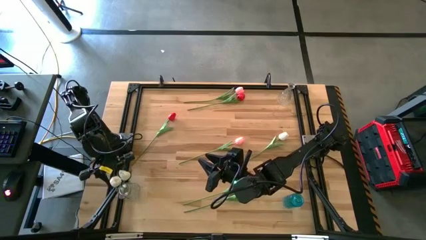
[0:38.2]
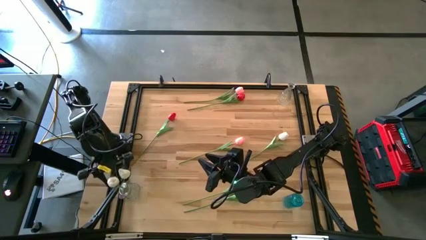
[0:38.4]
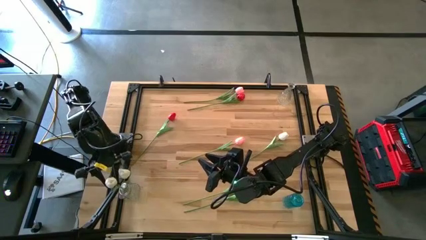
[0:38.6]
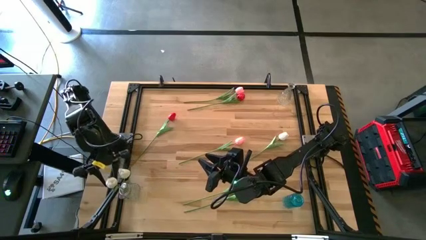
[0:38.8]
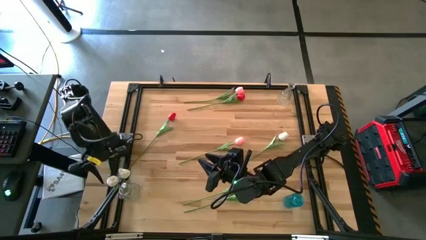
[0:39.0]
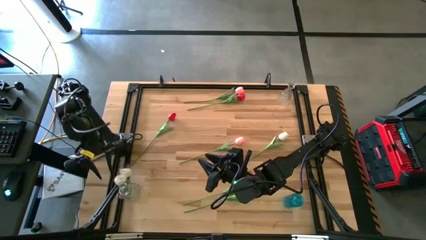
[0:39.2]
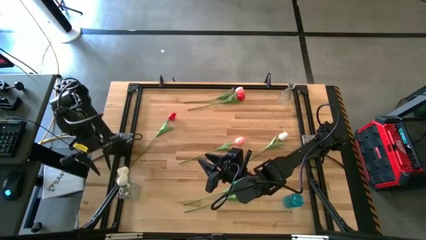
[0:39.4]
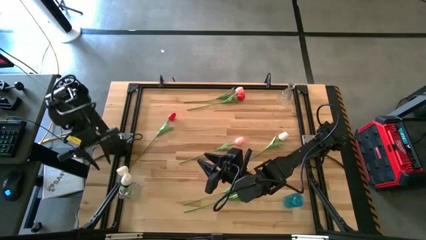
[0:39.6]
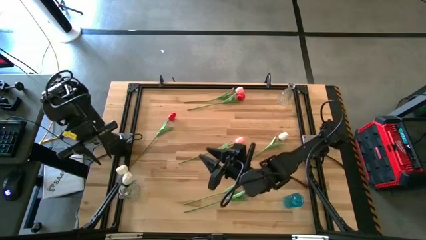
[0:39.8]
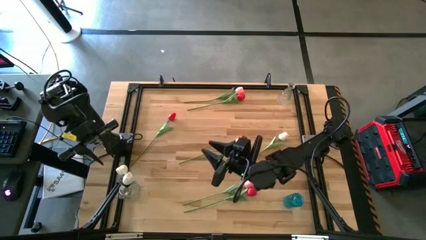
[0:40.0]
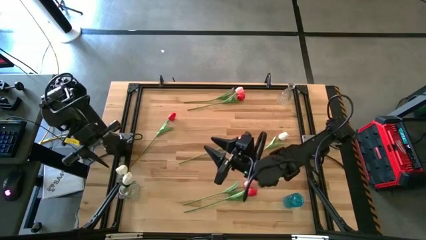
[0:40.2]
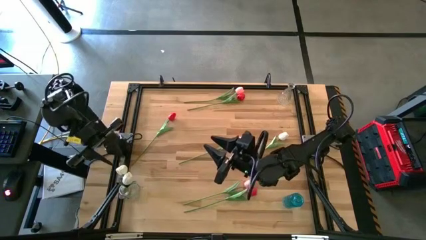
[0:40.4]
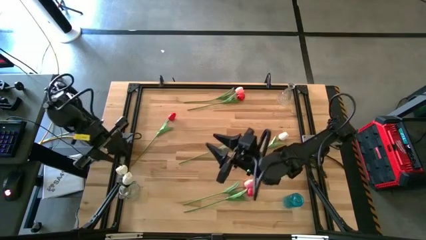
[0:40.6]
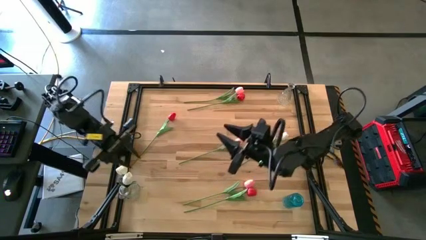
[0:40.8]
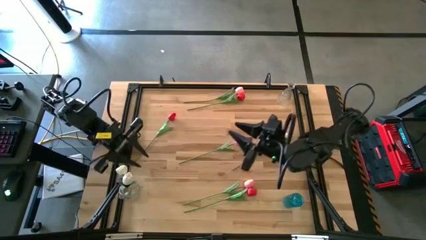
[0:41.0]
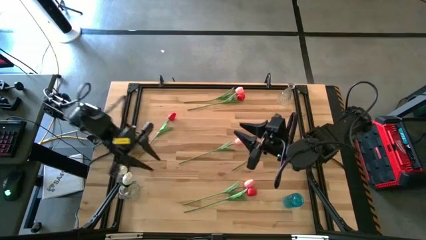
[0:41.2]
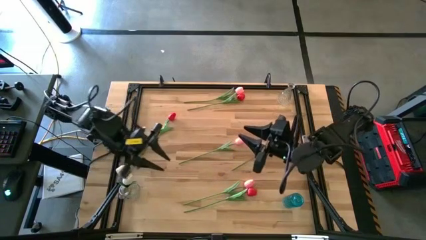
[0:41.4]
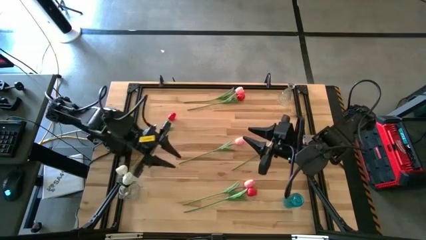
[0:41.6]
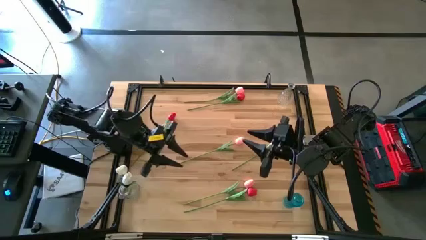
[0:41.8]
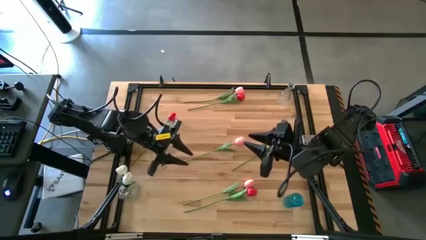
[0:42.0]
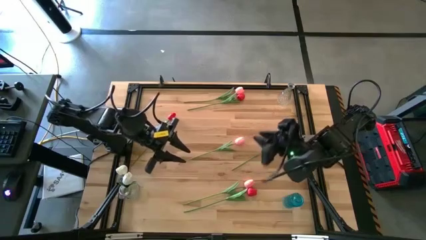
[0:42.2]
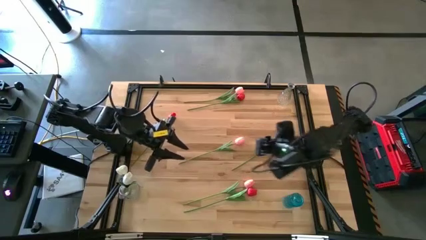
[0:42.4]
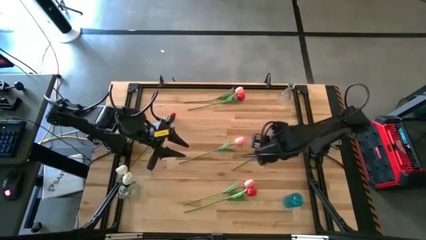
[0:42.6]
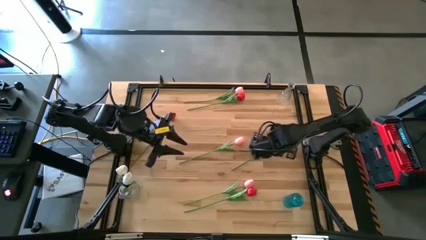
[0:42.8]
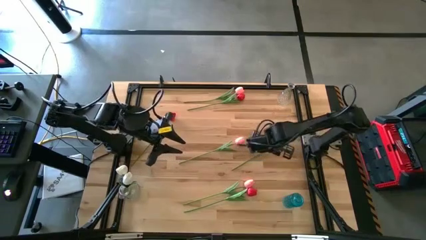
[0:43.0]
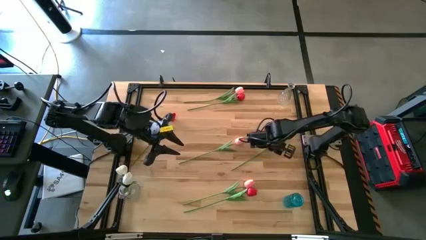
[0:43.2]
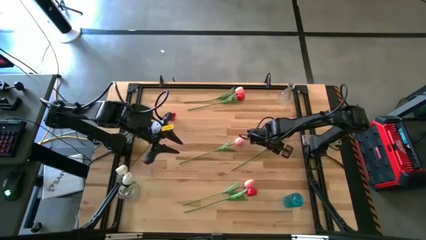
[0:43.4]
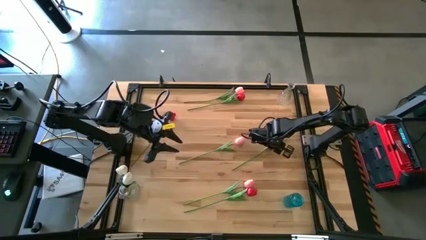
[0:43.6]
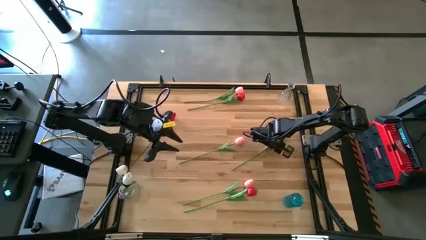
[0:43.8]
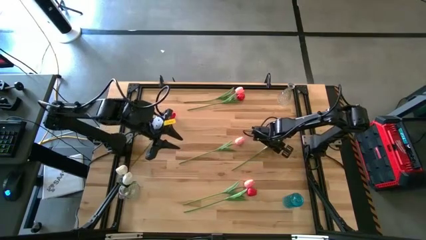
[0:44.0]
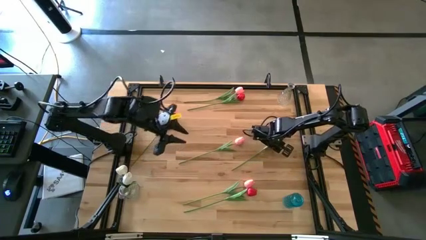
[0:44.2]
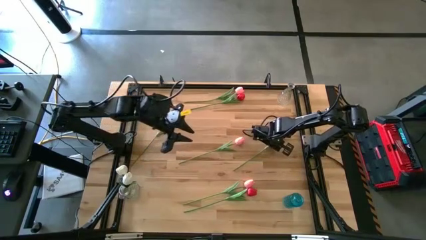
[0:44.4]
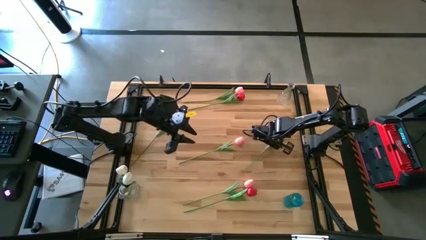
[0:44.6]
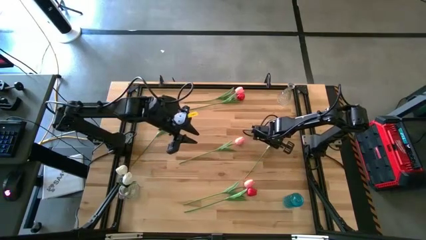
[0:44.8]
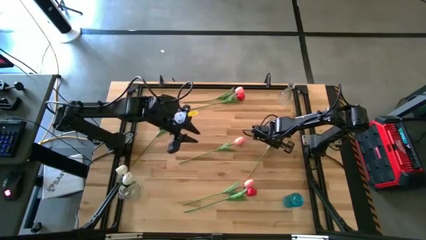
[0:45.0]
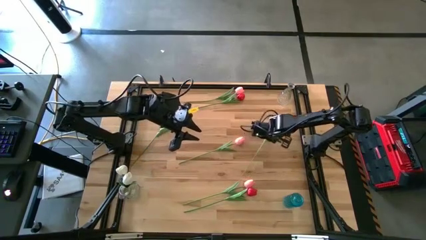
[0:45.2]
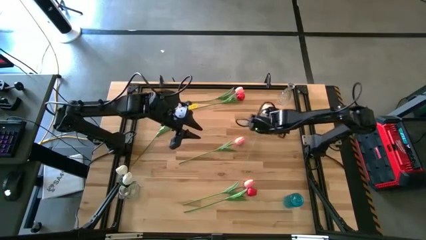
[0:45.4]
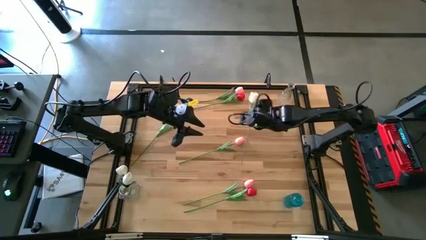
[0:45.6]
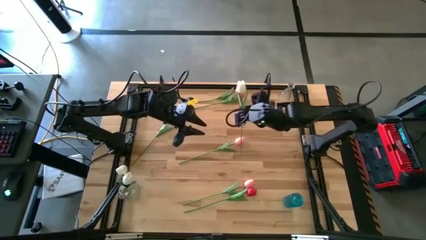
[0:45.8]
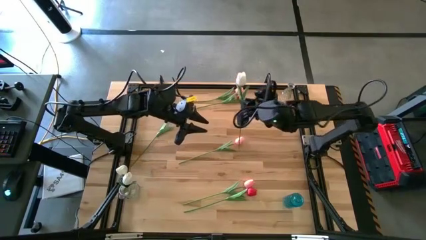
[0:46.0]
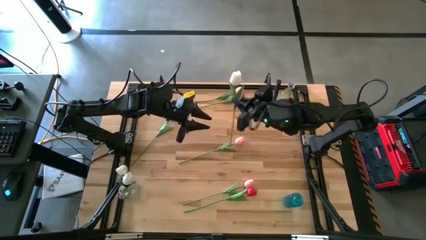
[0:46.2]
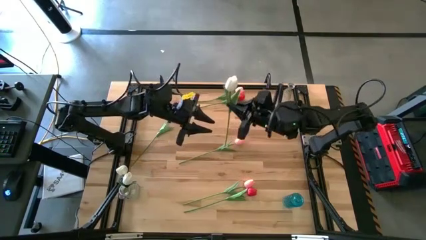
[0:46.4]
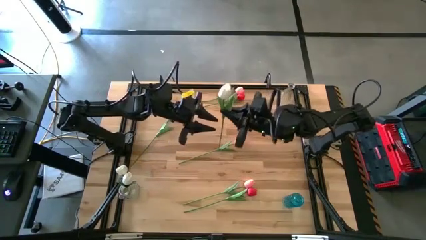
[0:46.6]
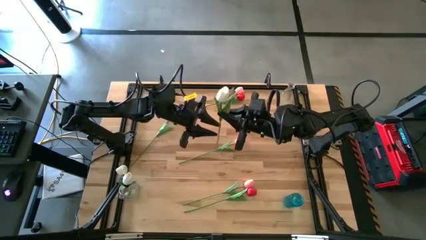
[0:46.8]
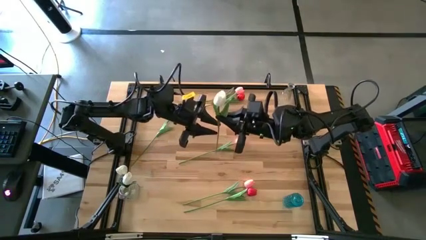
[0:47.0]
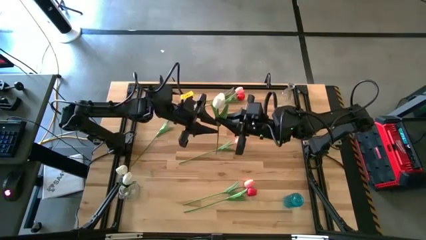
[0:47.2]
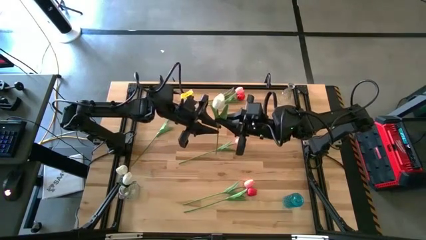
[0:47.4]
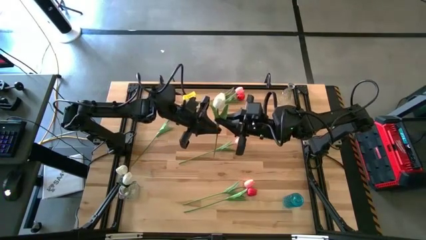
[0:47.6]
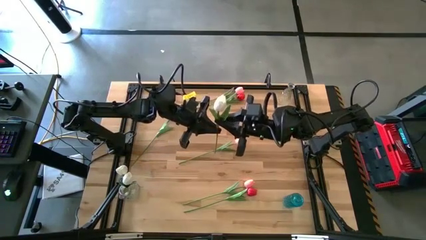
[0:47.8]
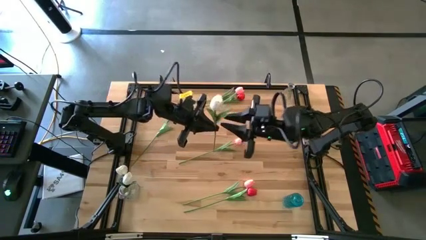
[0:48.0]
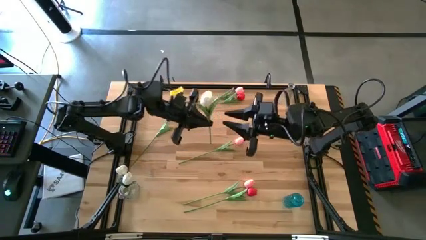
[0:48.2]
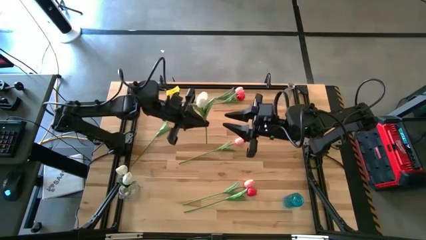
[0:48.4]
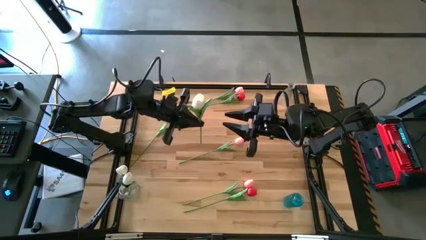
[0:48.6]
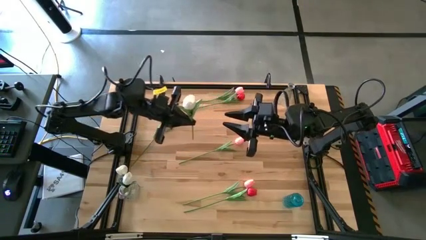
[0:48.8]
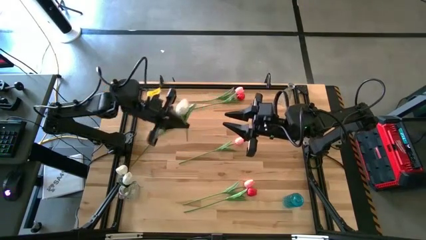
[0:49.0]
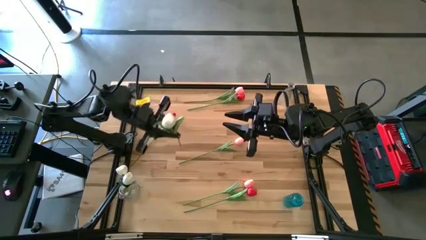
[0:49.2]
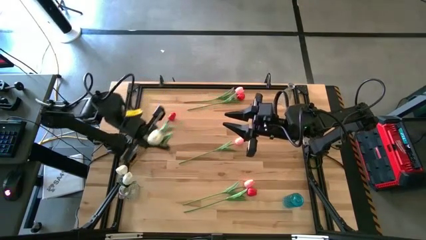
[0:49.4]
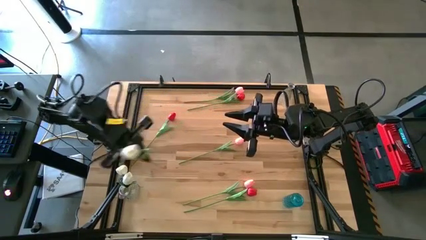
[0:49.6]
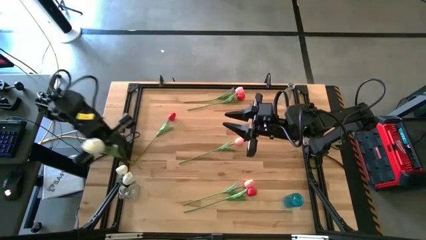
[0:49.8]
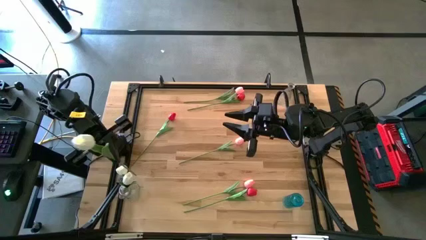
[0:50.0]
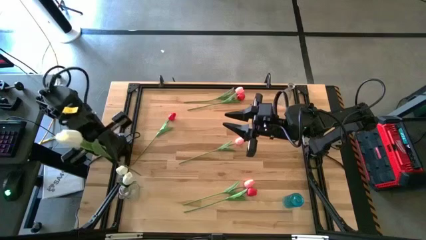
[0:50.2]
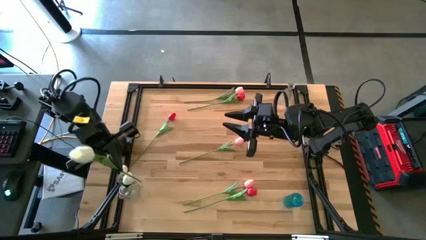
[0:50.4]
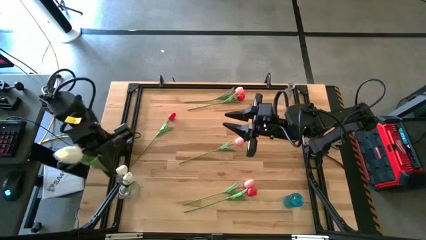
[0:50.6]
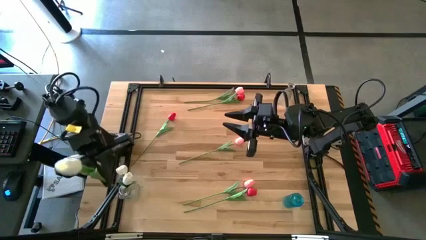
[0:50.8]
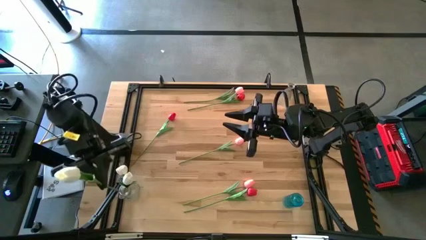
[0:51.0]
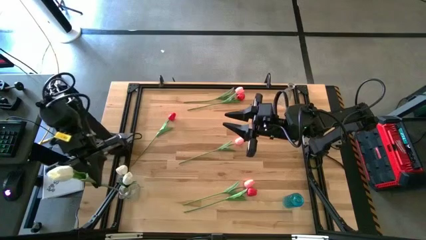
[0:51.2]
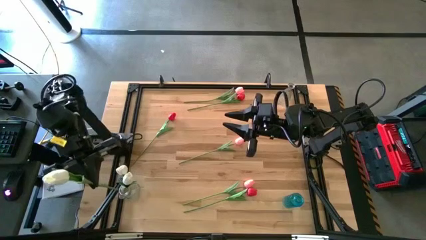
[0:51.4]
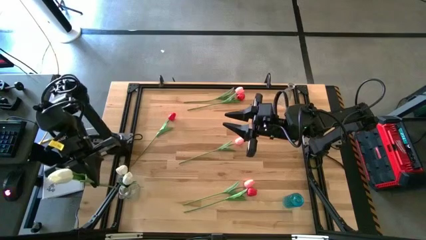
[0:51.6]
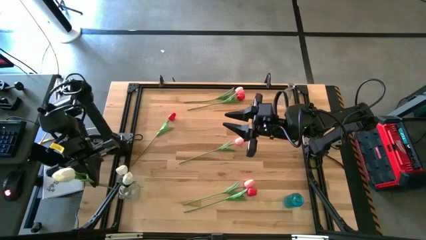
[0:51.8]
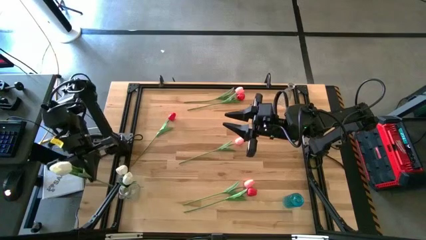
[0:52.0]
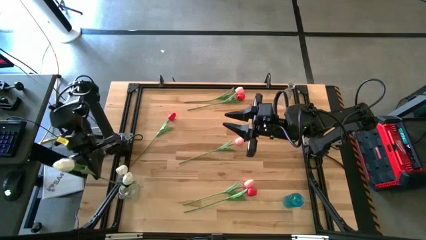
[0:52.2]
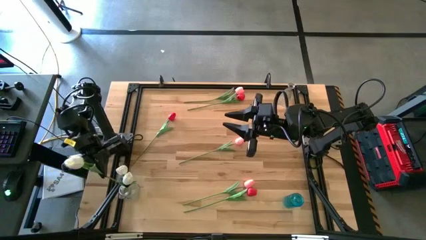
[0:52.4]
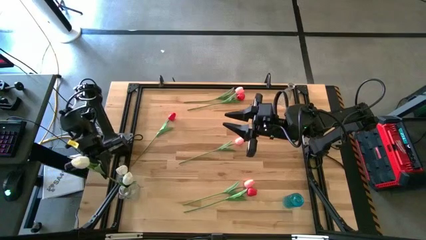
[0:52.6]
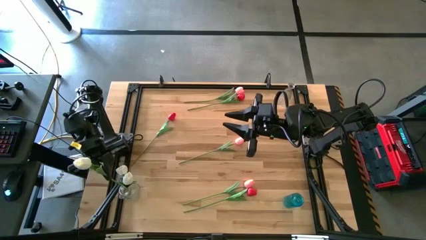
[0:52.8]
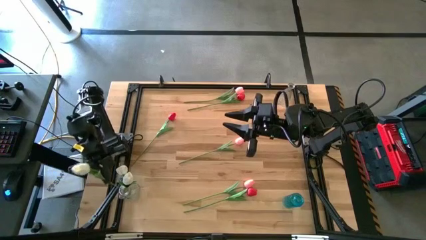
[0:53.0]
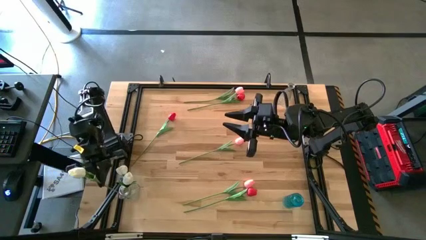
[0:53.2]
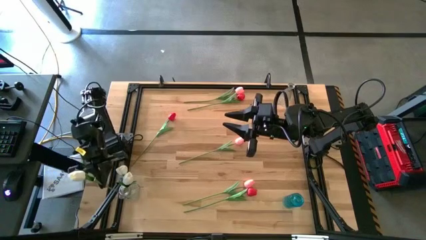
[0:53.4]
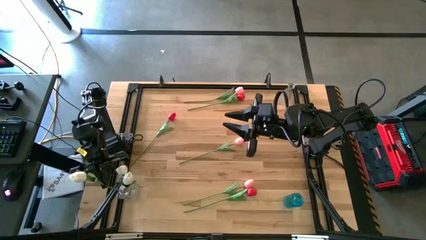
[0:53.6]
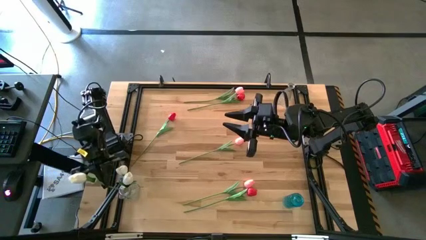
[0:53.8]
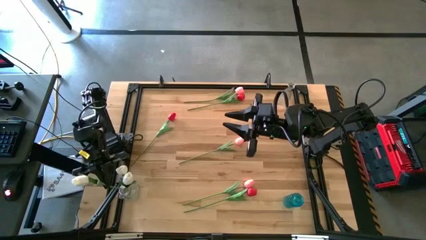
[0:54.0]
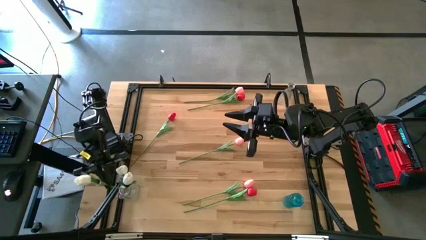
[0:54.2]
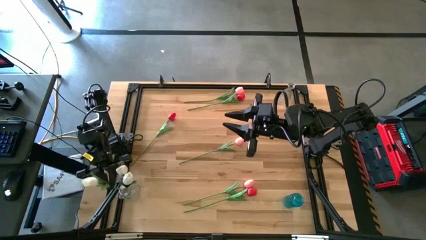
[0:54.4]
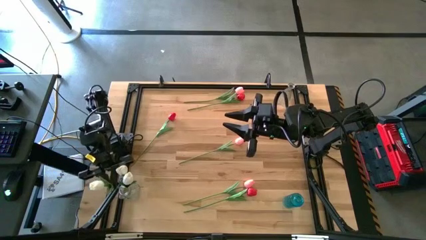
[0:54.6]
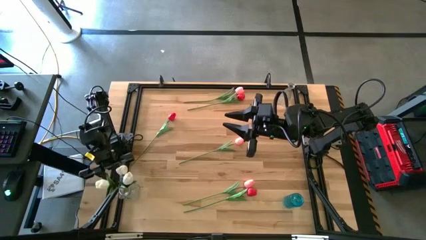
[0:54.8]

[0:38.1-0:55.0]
Task: Sort flowers into vase by color
Put the white flower into the bottom transparent vase

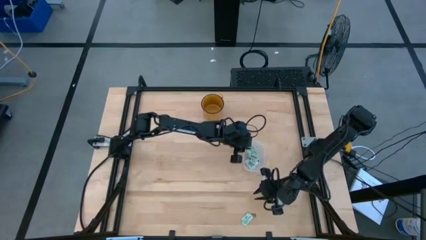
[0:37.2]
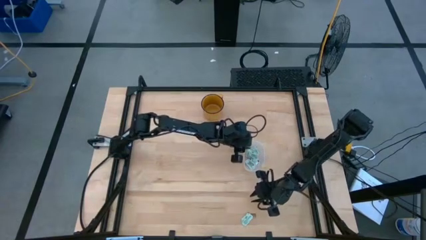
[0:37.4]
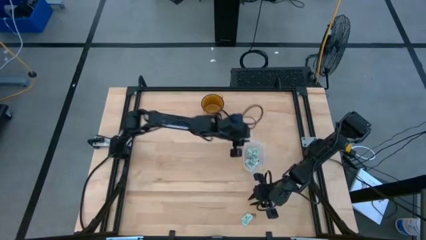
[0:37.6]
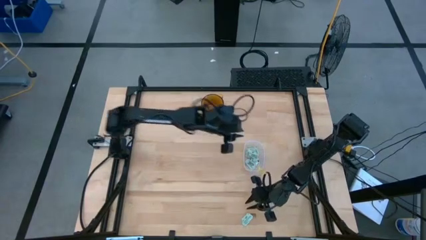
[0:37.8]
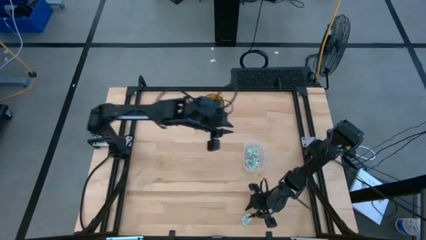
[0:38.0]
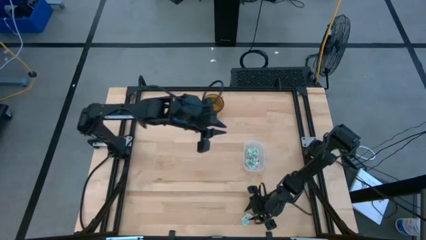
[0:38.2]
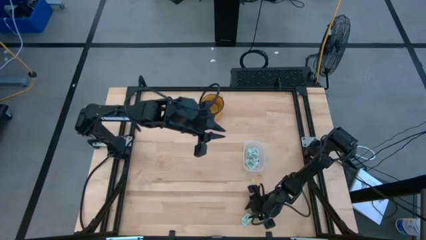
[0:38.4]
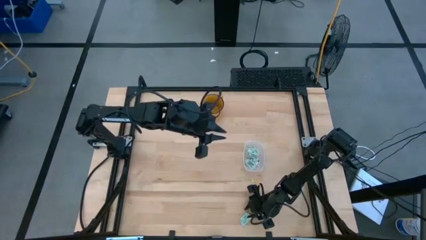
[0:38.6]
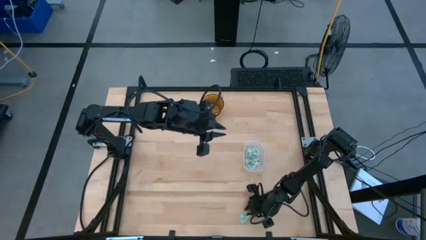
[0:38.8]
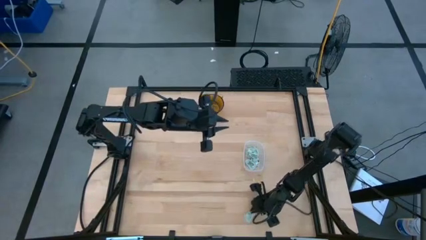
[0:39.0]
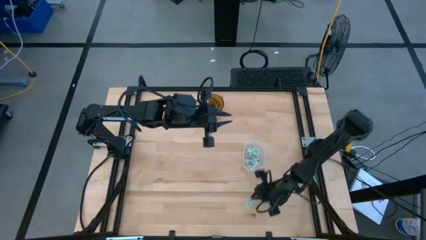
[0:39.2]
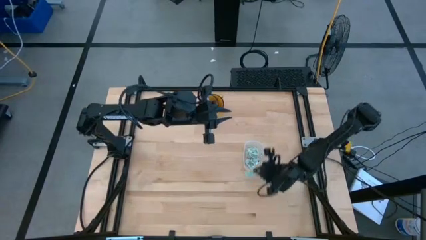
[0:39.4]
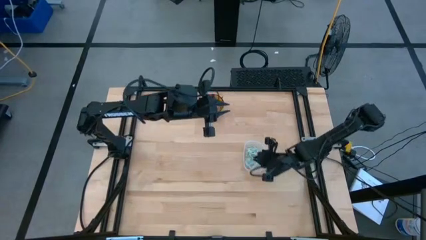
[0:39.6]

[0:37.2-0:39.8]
Task: Pick and place Stevia / Truvia into bins
Put the white stevia packet into the transparent bin
